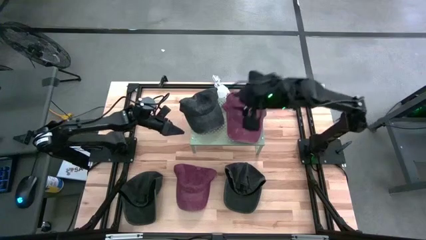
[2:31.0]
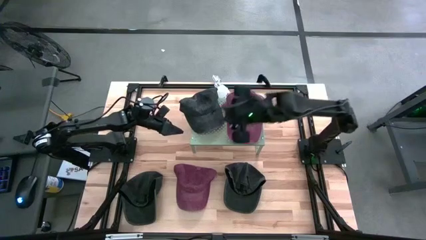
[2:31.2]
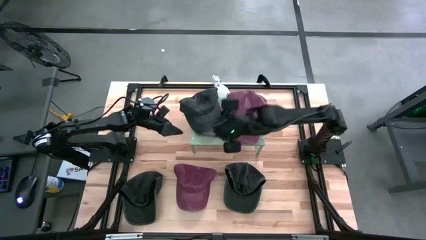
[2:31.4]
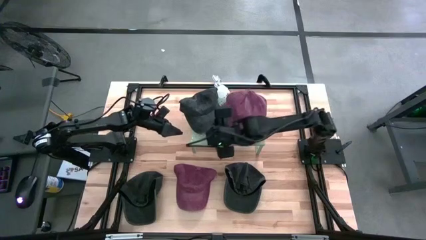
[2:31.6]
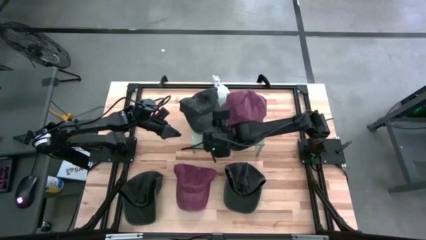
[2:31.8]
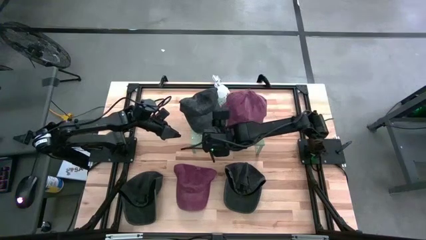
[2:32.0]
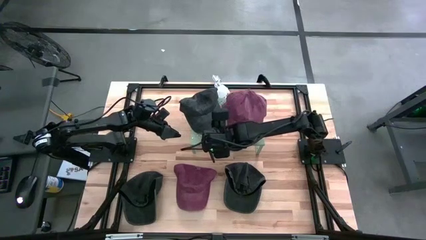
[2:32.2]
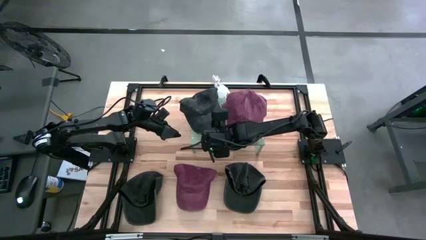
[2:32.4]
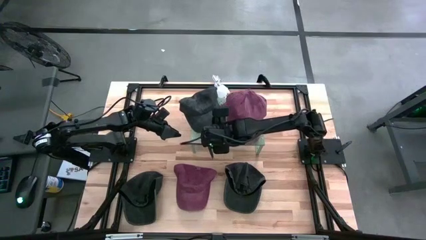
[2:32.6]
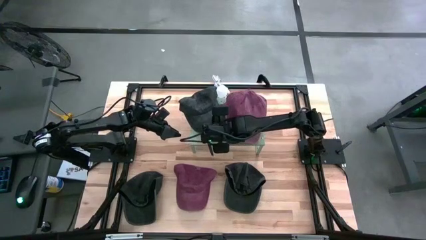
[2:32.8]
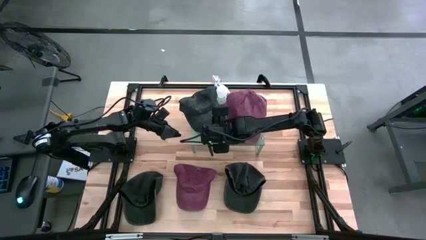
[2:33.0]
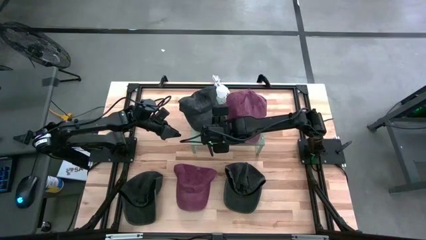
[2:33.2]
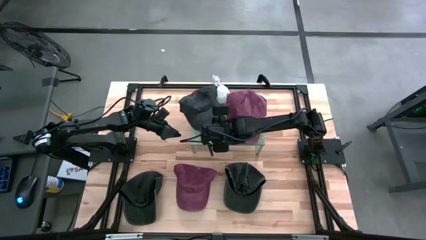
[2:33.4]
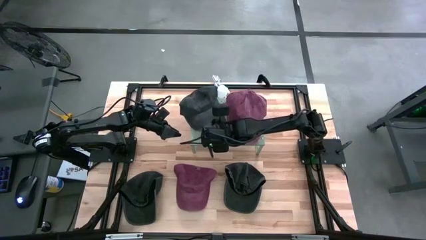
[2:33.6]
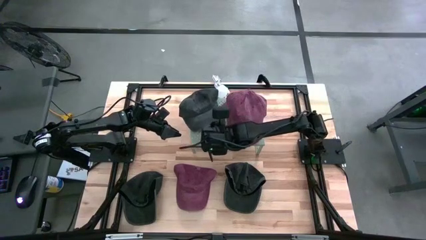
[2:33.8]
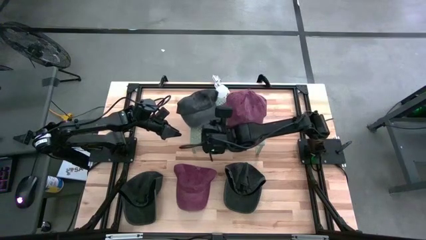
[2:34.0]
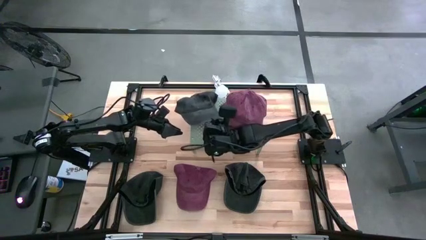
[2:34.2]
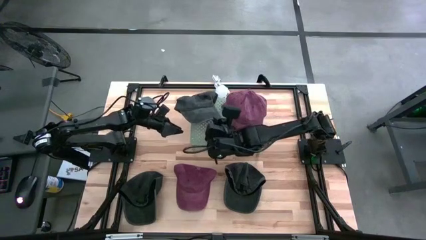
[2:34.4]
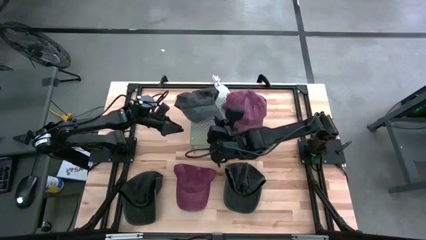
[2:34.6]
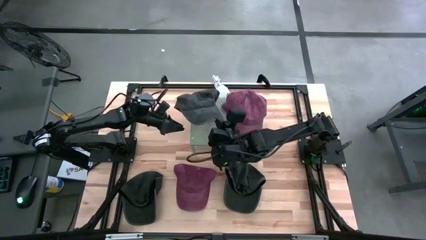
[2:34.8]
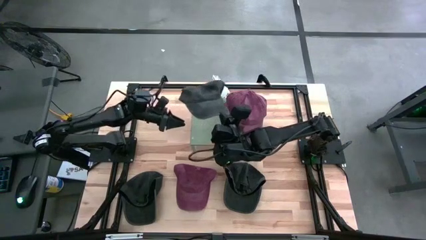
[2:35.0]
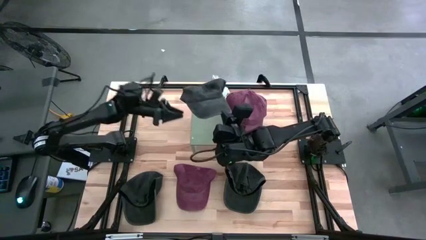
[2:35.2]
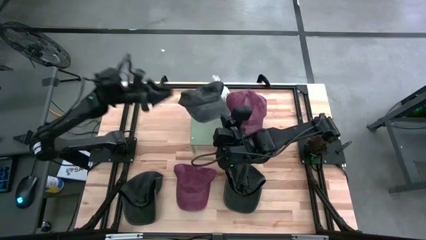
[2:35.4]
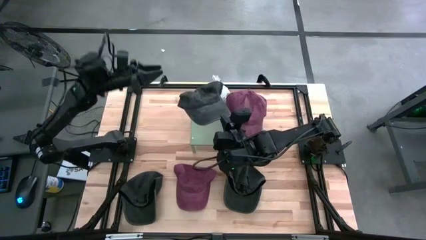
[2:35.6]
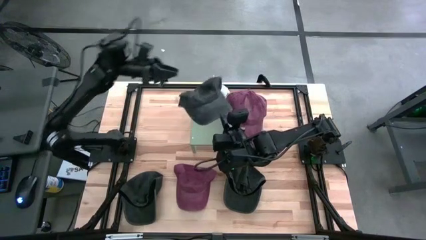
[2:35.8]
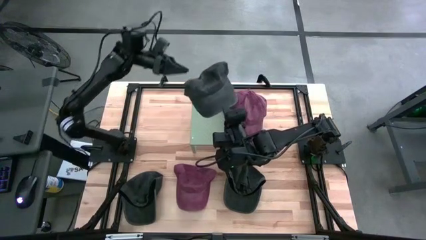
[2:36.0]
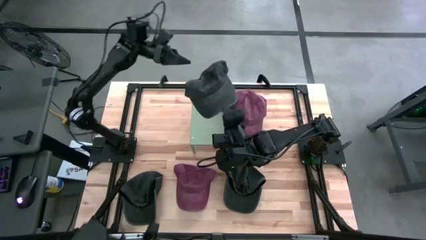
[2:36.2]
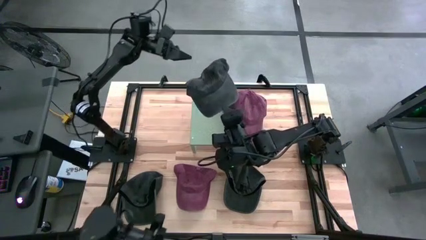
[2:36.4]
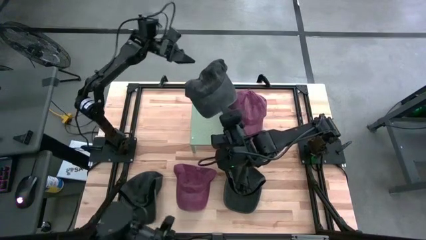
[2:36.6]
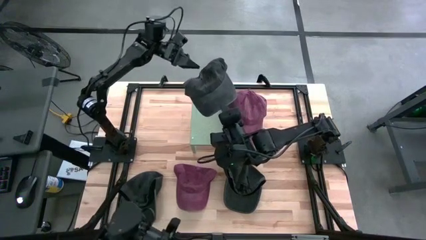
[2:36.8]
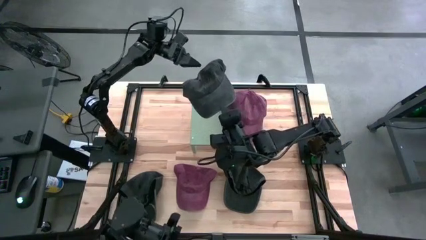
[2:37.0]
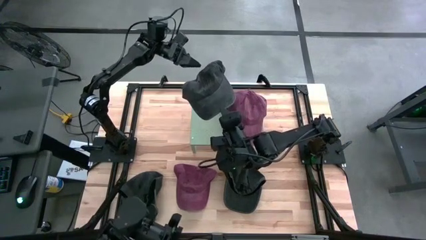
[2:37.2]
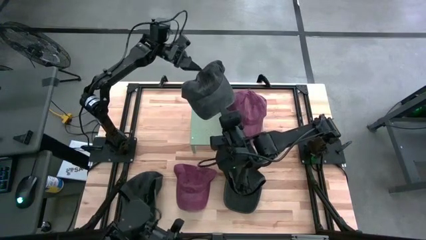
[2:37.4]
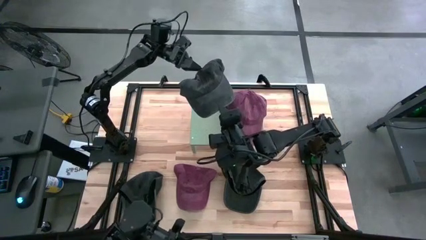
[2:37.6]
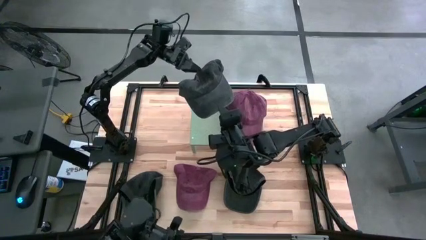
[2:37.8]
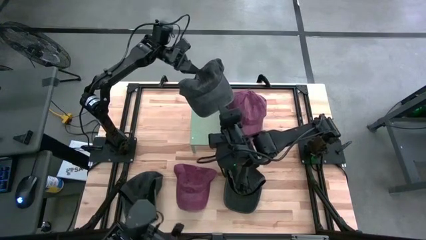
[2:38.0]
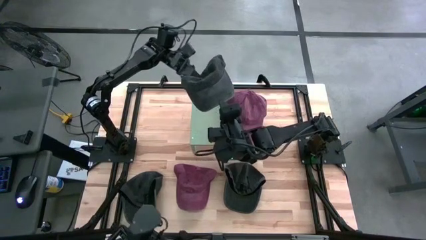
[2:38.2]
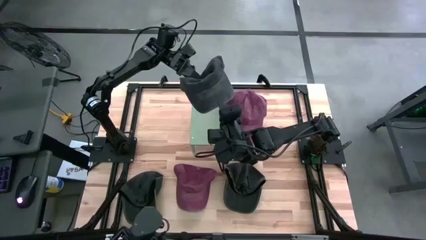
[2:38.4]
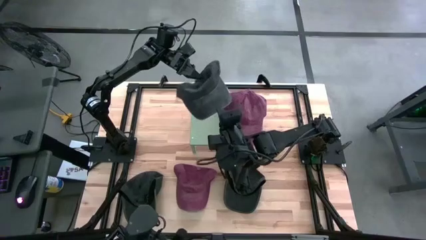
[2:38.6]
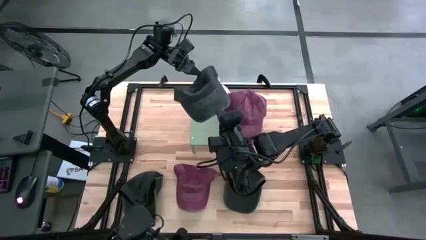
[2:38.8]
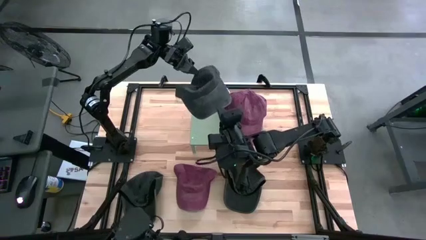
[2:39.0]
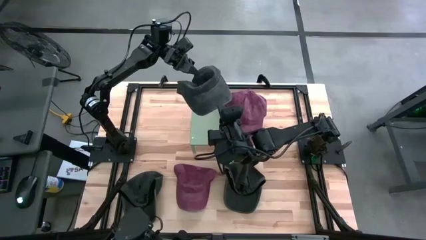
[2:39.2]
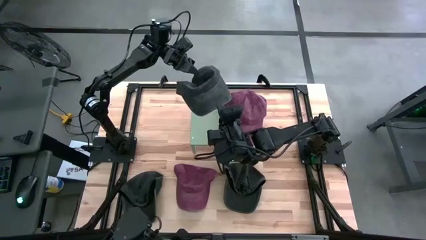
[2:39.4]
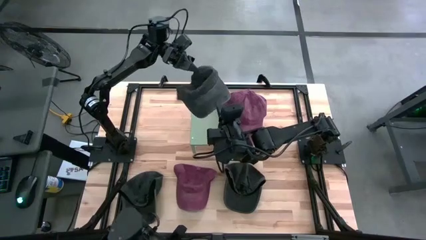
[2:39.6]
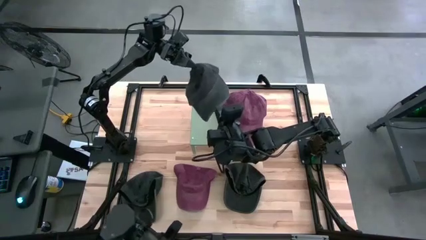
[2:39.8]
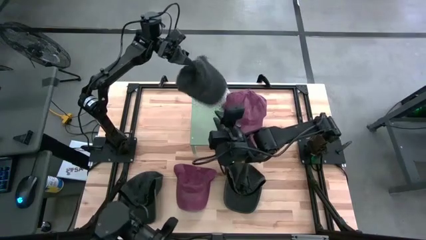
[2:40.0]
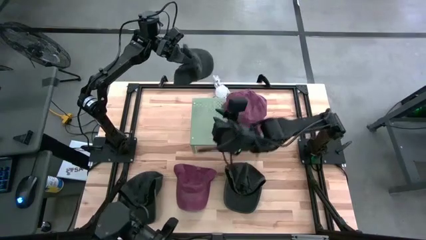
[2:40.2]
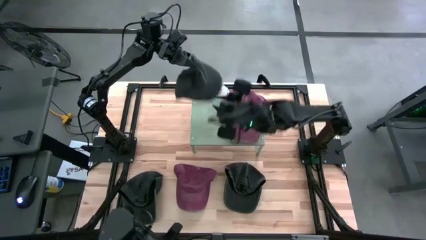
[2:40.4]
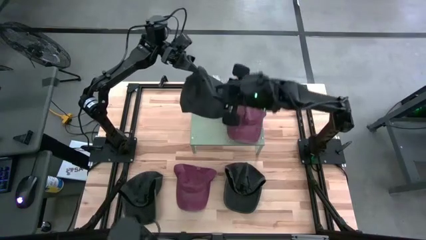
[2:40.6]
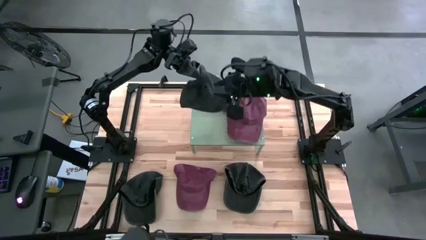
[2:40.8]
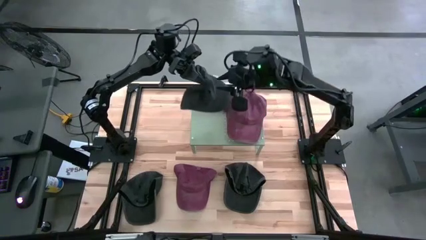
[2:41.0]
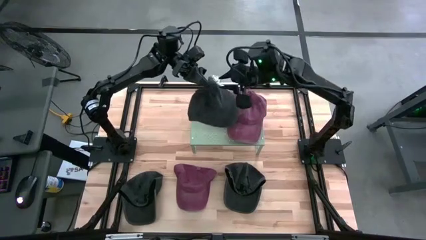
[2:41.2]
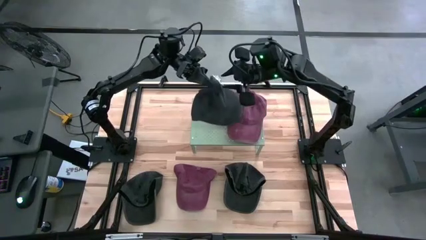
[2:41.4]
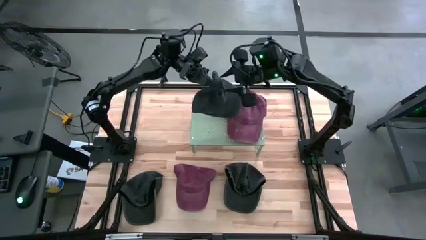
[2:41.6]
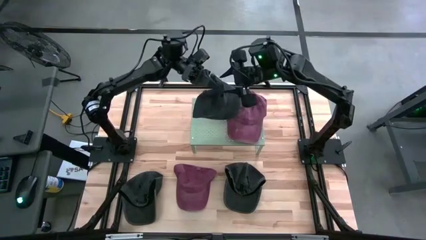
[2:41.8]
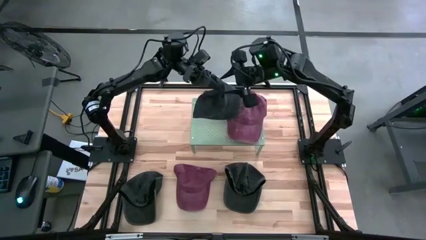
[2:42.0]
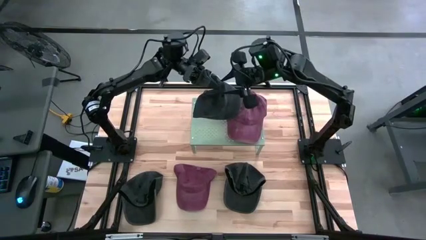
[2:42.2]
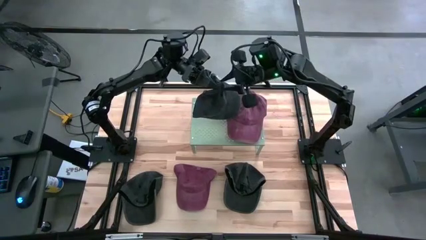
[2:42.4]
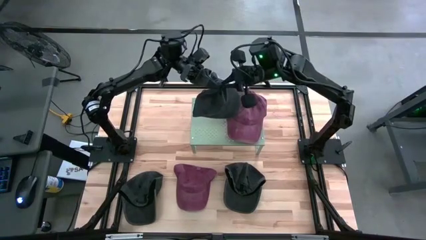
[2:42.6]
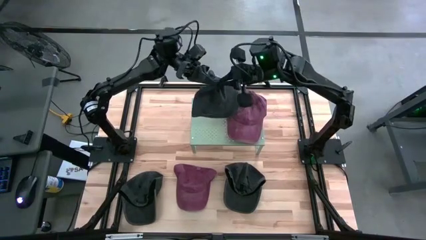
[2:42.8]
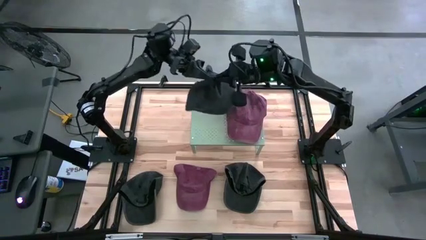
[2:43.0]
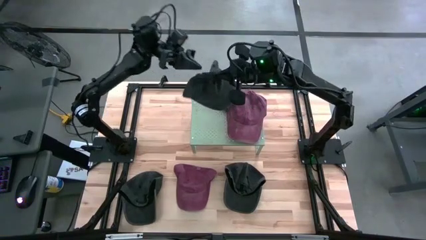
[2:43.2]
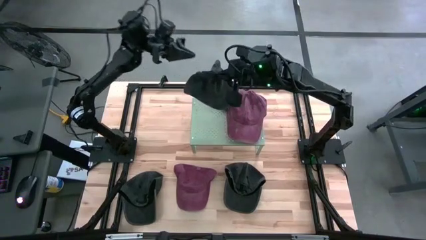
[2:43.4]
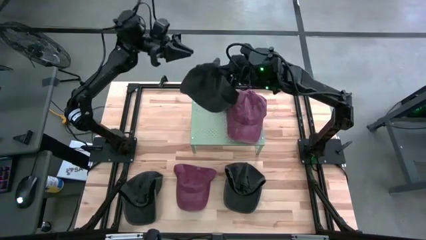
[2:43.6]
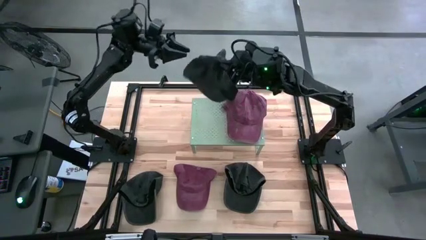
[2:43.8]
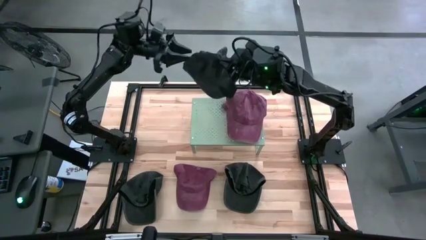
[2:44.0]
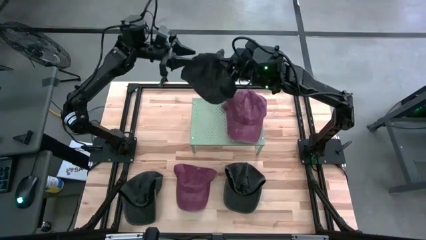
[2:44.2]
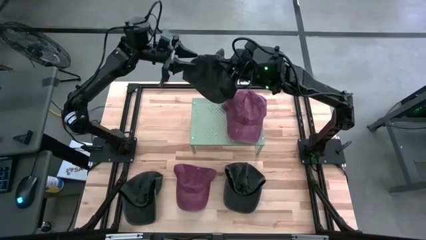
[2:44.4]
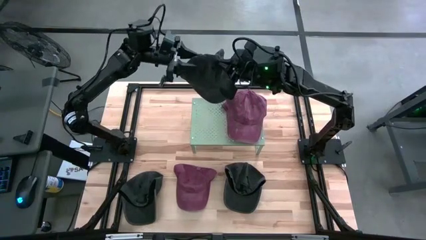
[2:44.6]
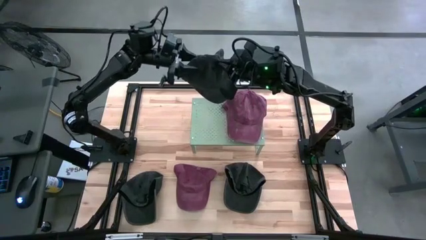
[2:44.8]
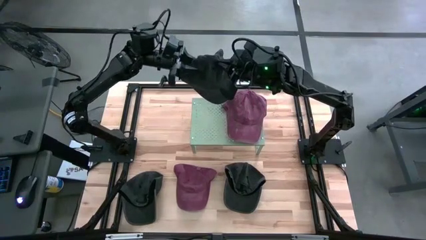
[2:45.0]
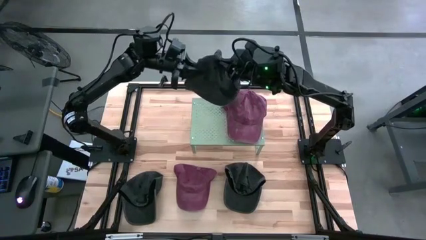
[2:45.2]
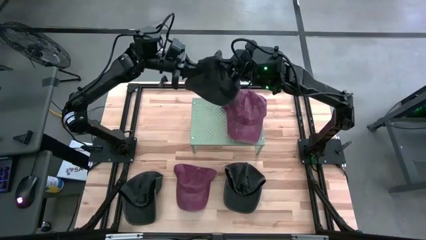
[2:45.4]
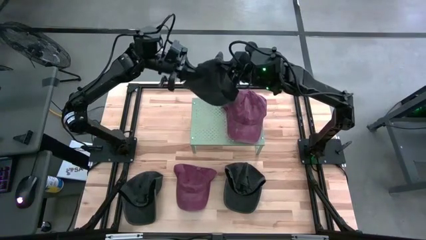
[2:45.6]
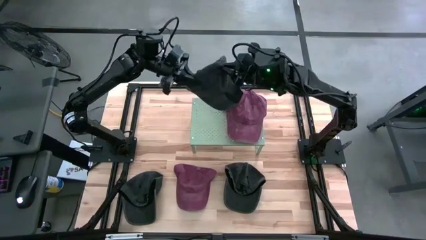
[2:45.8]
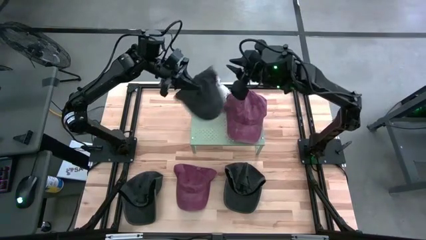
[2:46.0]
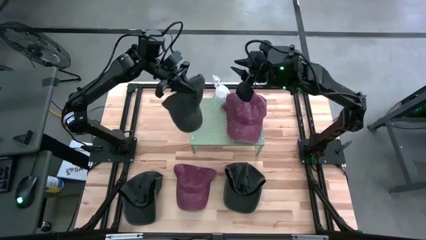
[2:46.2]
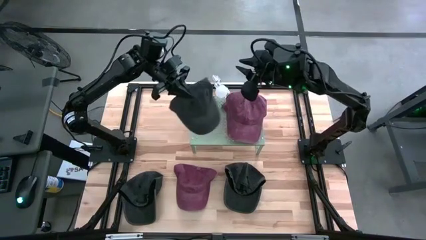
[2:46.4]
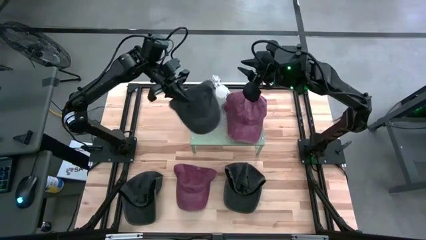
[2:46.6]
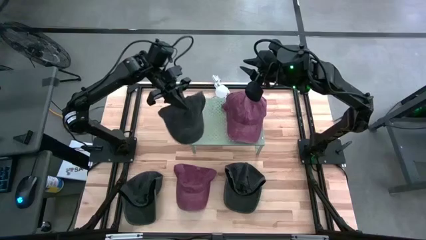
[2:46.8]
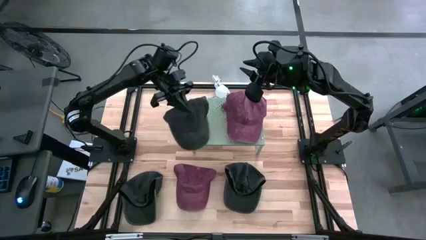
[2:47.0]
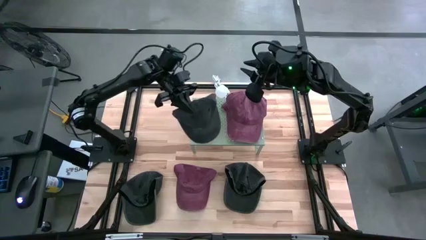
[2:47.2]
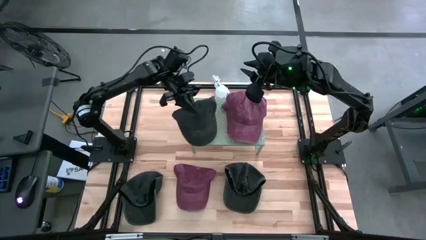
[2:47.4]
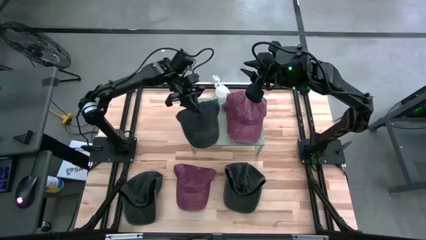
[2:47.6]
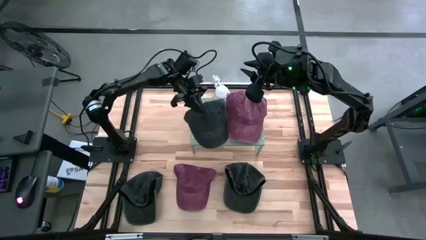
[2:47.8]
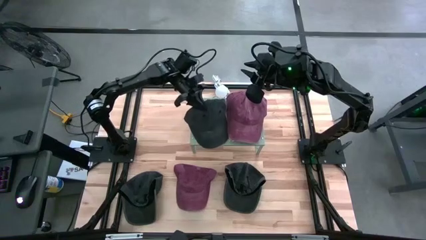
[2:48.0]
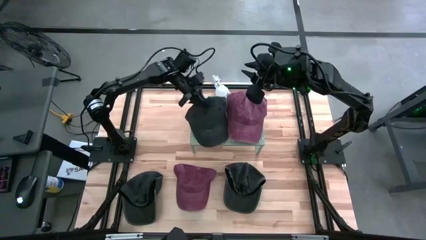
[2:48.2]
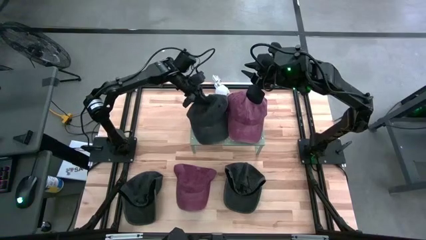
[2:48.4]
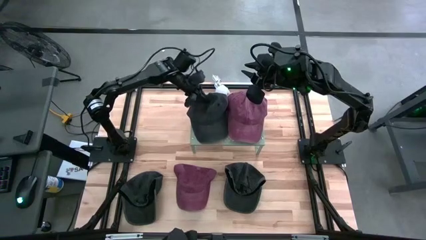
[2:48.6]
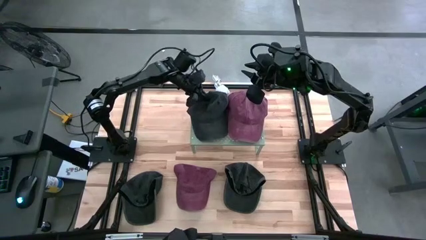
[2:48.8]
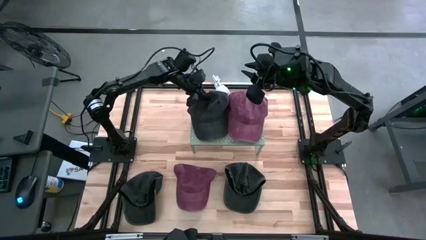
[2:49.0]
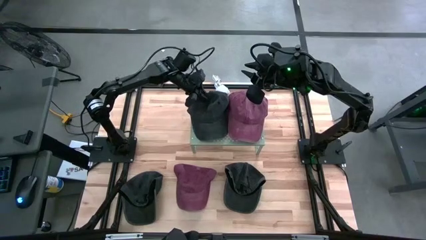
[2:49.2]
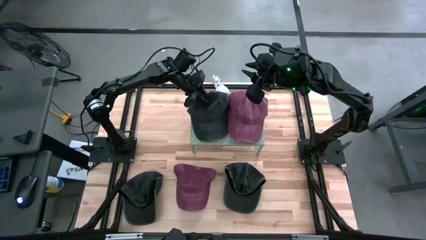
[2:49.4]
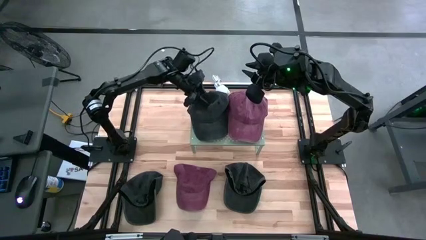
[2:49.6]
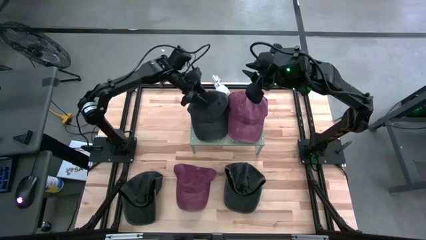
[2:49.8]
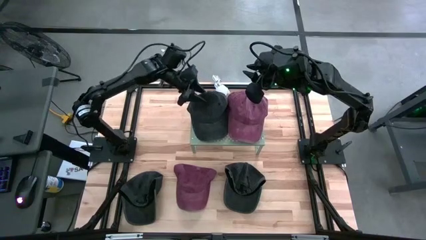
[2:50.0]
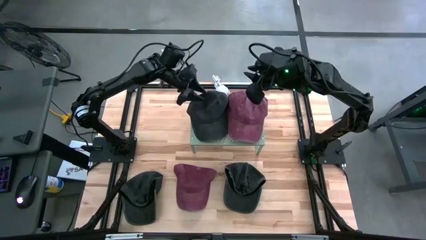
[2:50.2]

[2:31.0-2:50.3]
Task: Pick & Place hat
Adjust the black cap on the shelf
